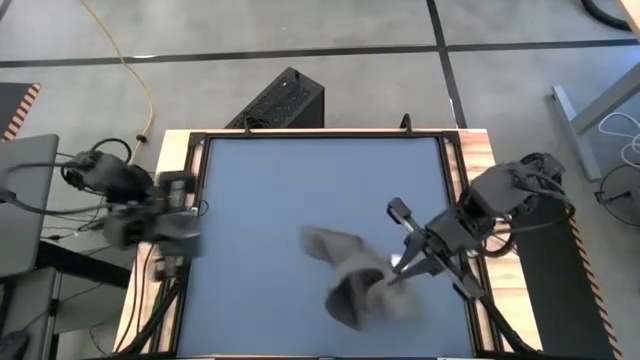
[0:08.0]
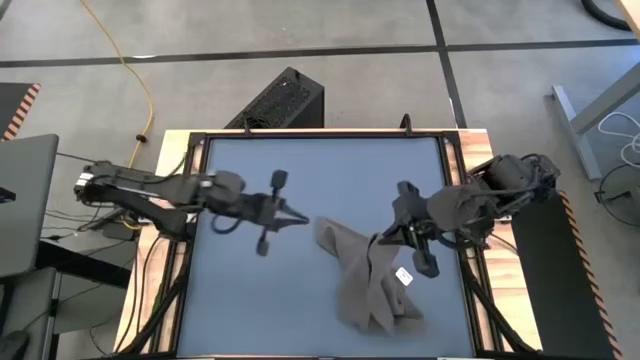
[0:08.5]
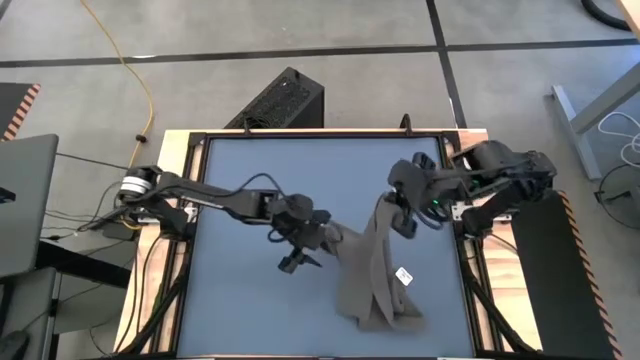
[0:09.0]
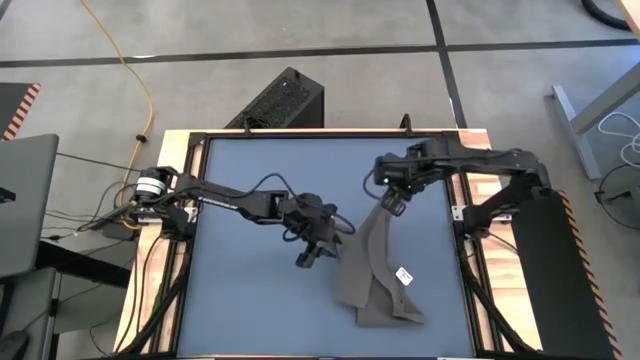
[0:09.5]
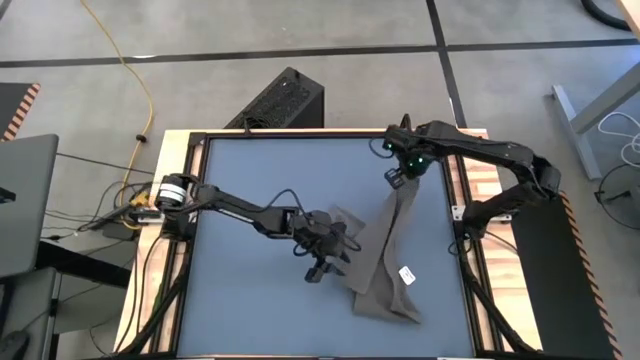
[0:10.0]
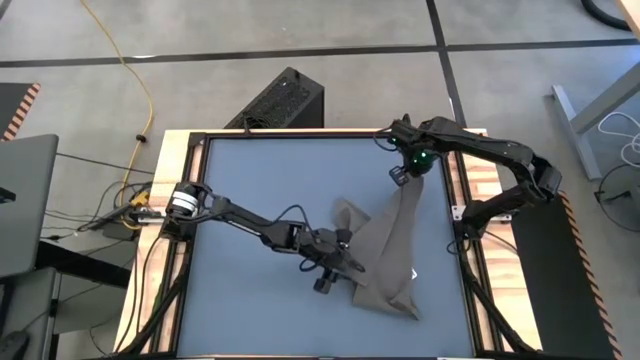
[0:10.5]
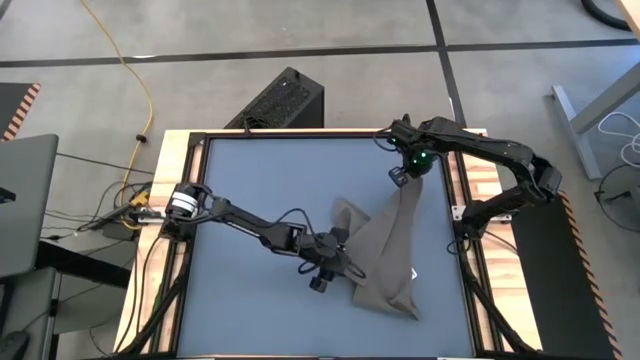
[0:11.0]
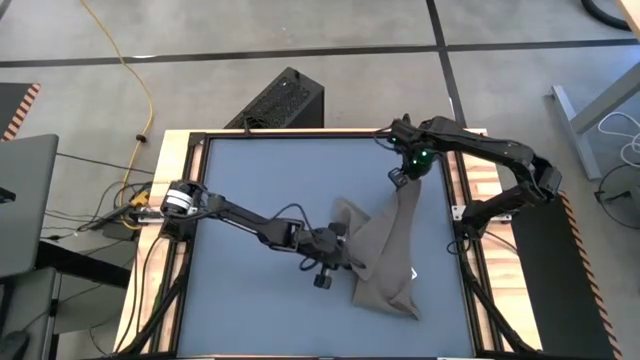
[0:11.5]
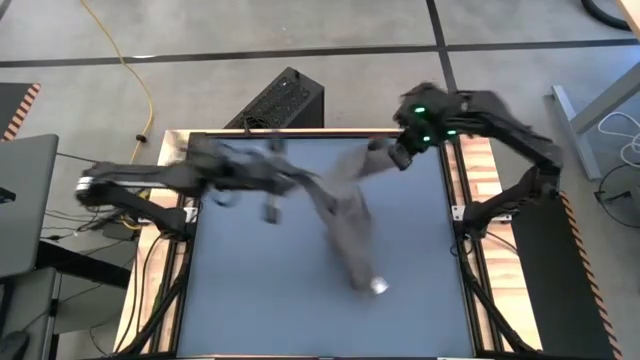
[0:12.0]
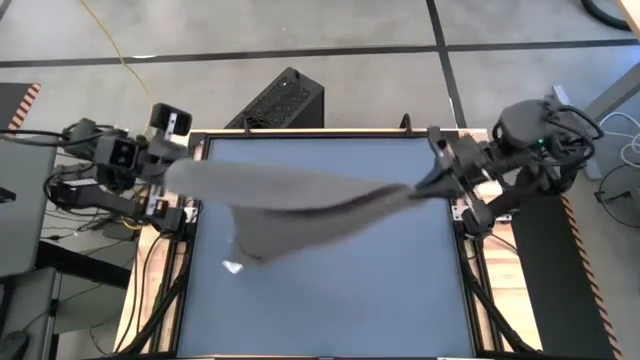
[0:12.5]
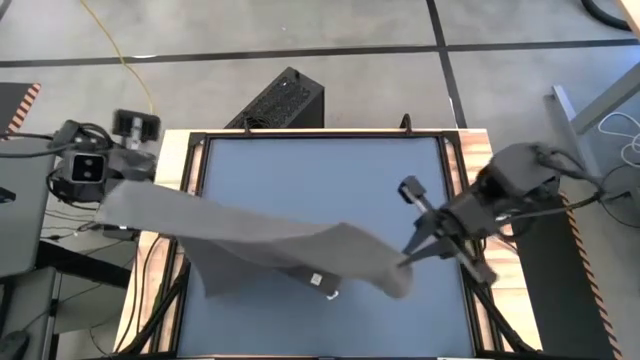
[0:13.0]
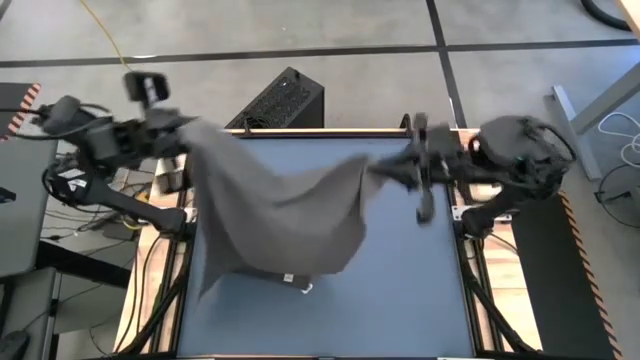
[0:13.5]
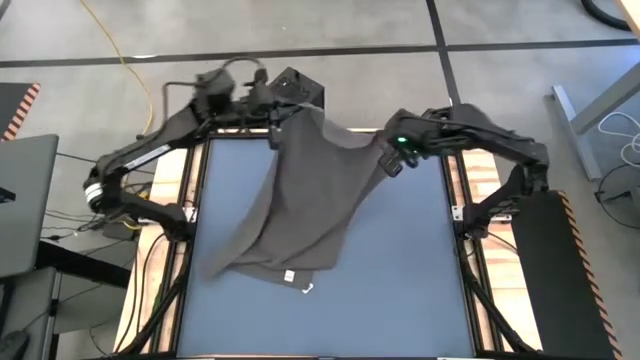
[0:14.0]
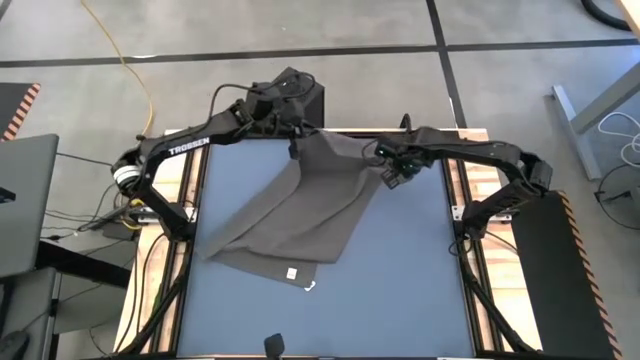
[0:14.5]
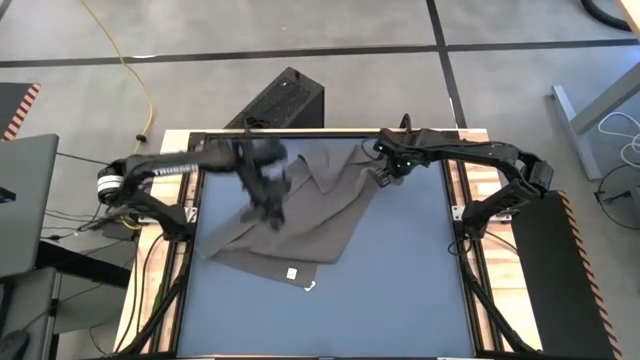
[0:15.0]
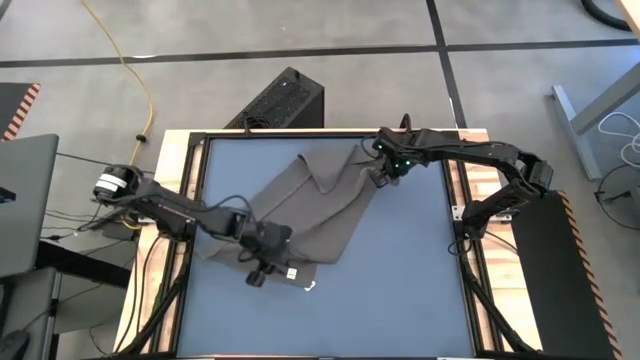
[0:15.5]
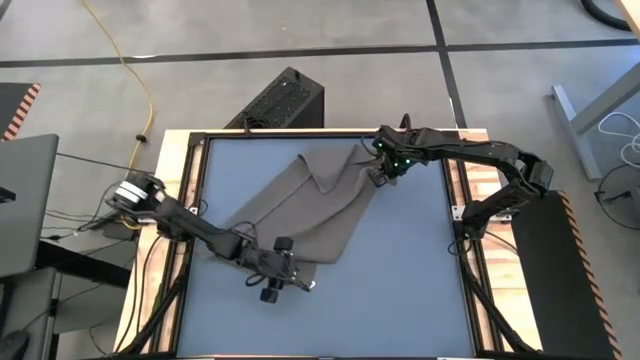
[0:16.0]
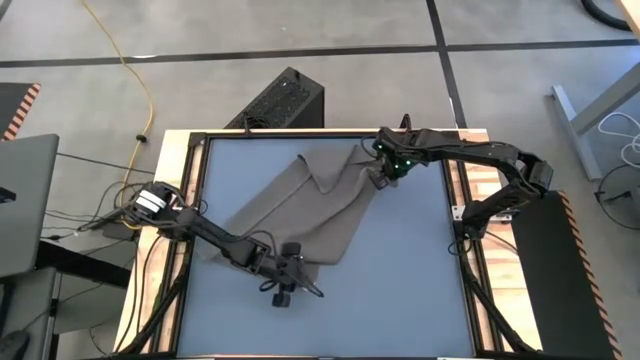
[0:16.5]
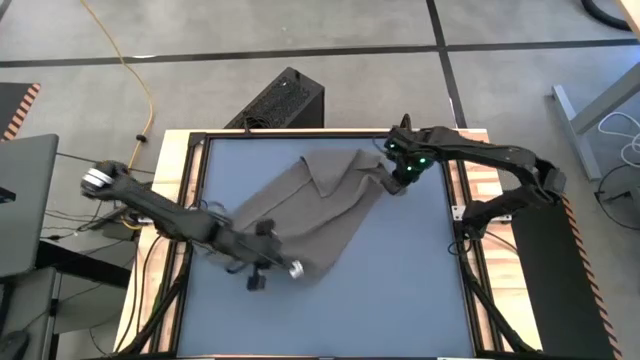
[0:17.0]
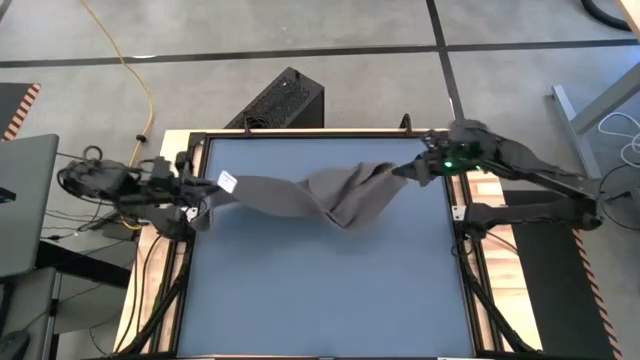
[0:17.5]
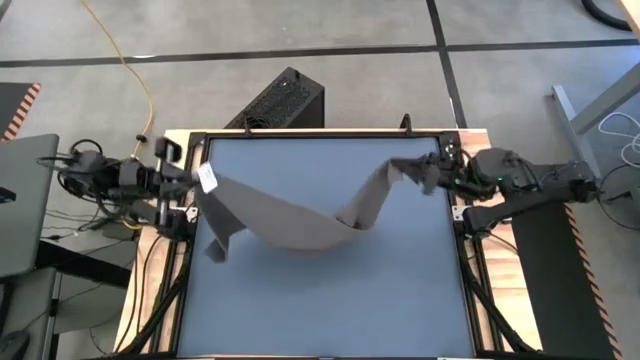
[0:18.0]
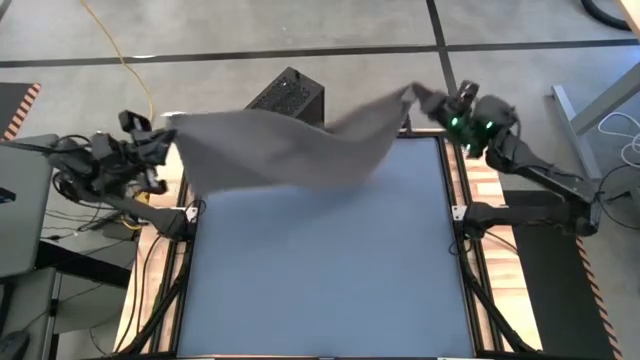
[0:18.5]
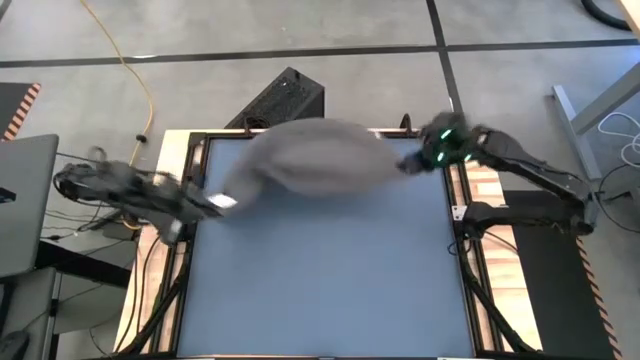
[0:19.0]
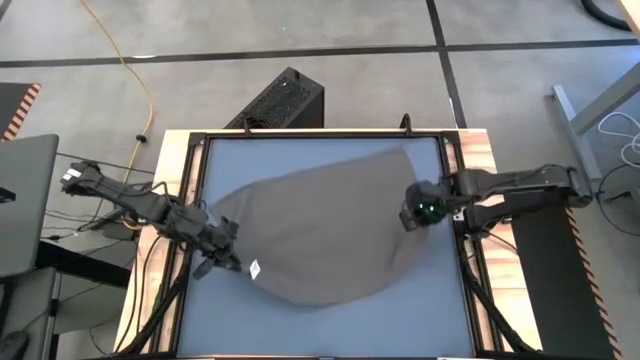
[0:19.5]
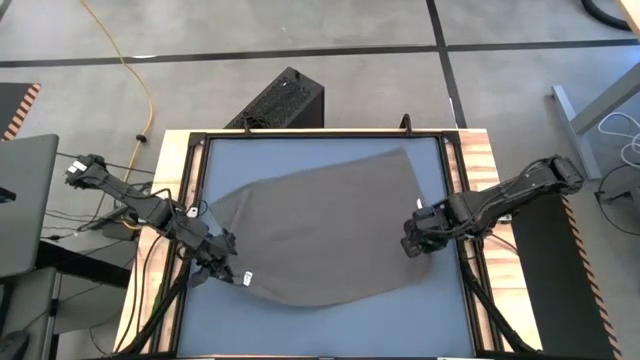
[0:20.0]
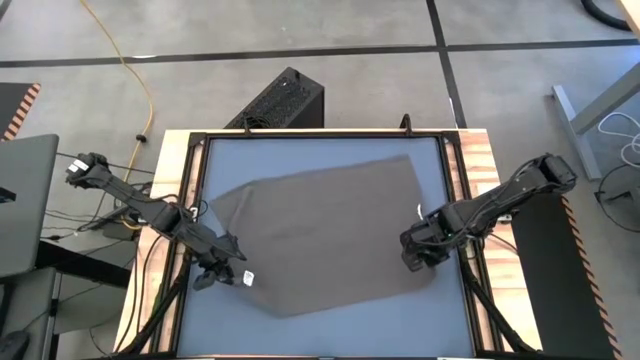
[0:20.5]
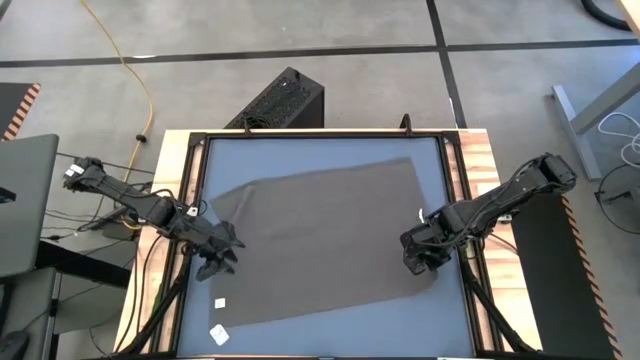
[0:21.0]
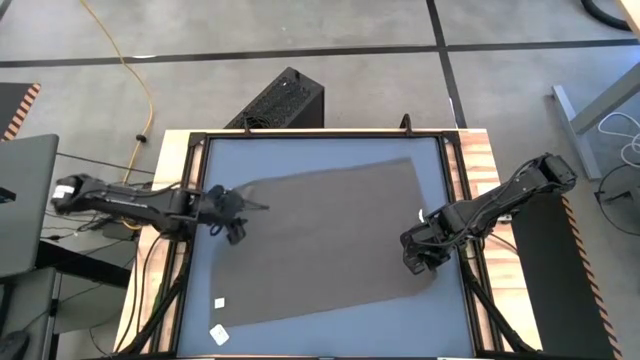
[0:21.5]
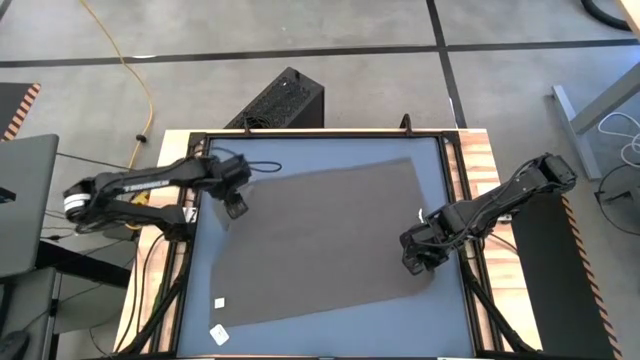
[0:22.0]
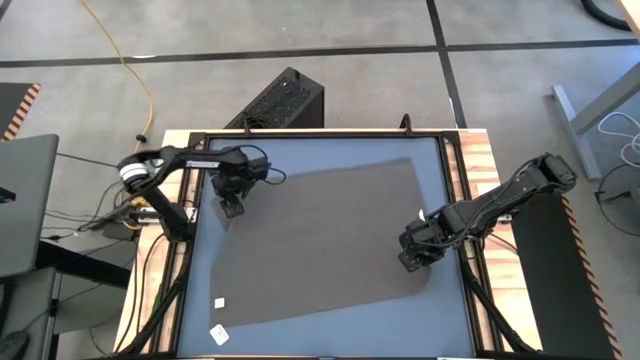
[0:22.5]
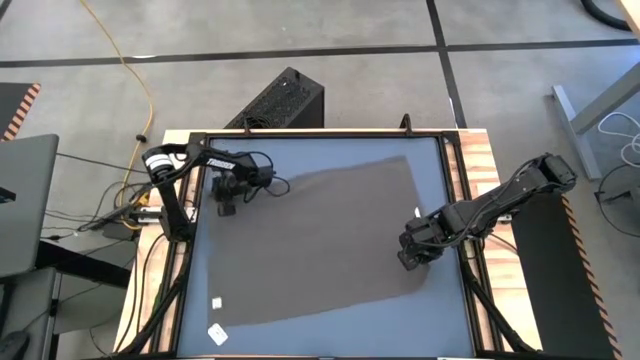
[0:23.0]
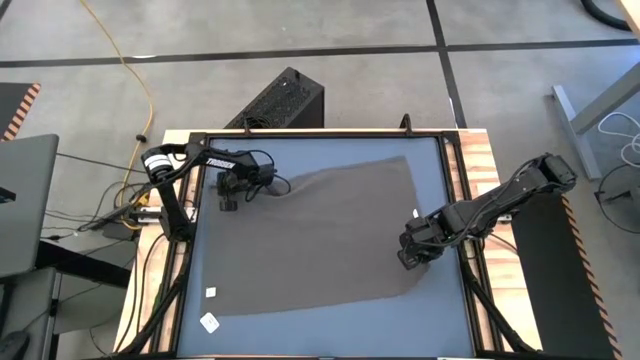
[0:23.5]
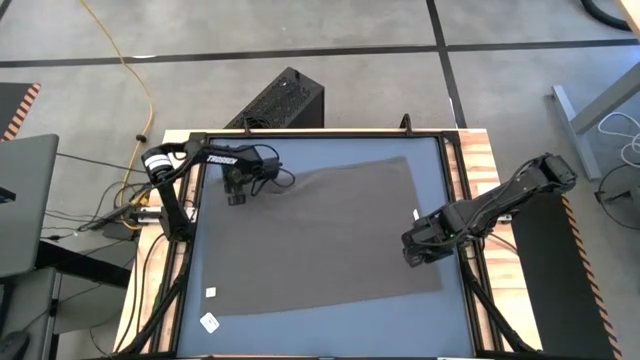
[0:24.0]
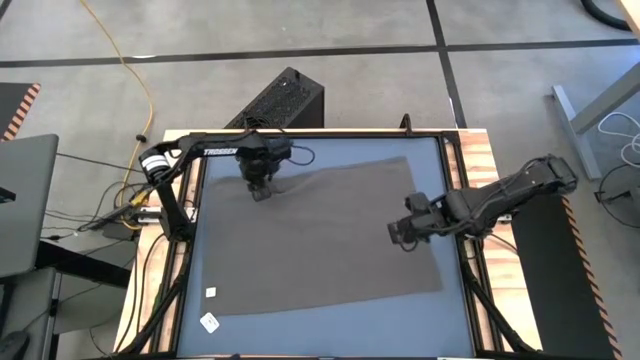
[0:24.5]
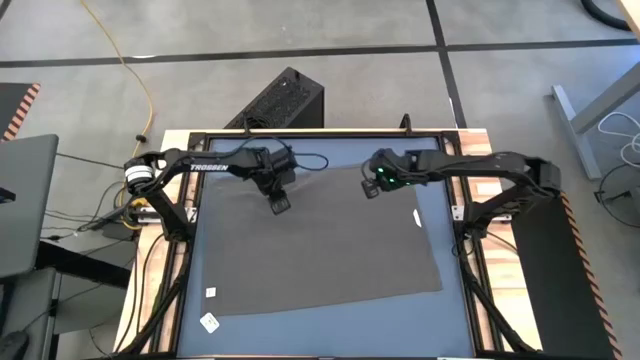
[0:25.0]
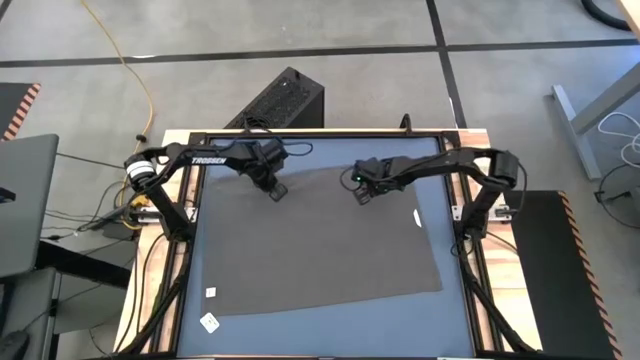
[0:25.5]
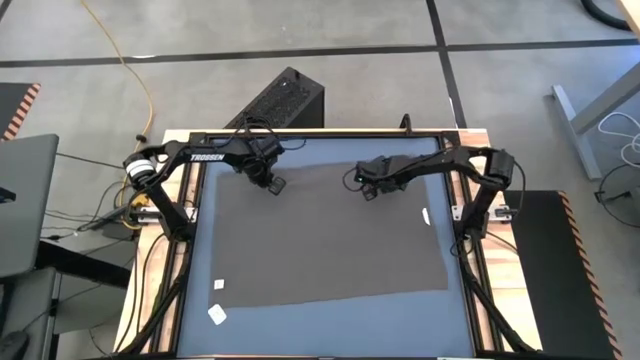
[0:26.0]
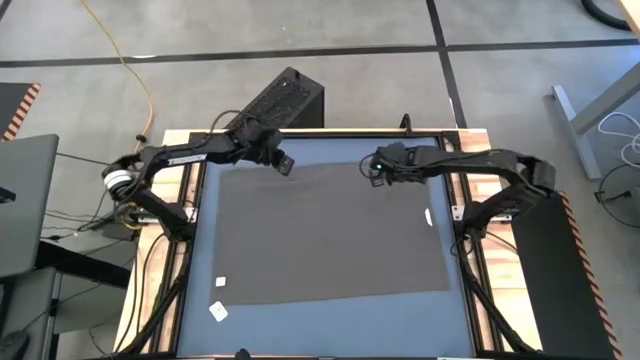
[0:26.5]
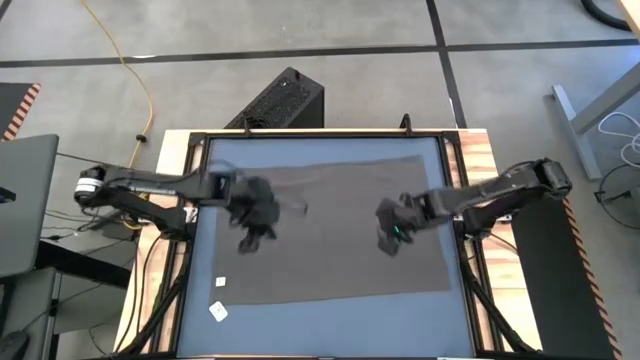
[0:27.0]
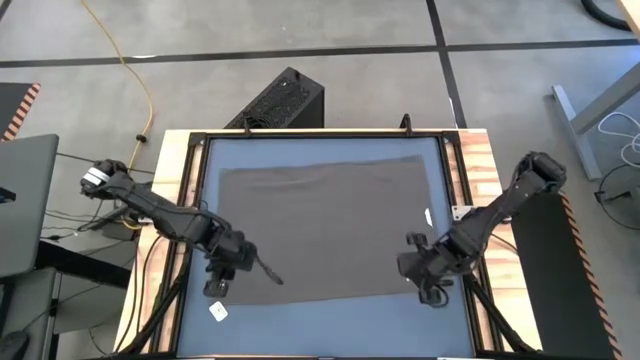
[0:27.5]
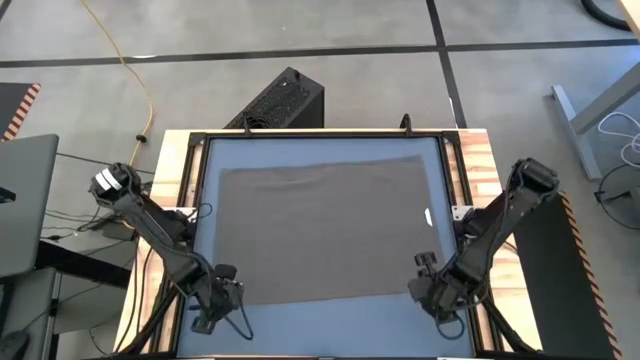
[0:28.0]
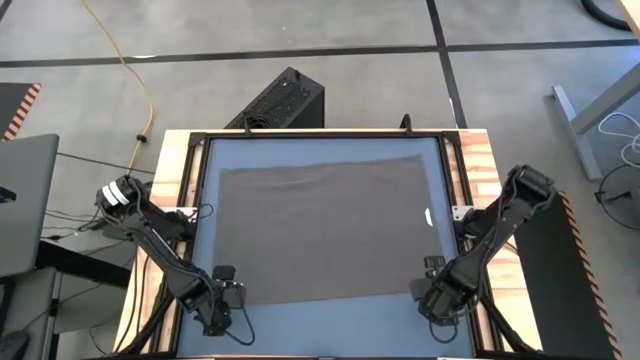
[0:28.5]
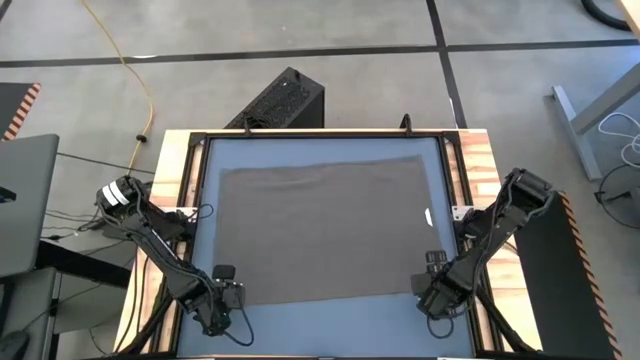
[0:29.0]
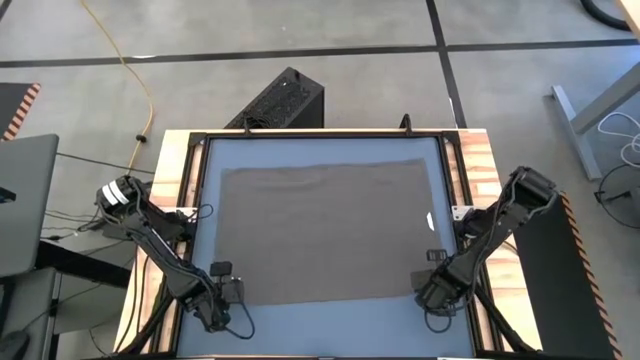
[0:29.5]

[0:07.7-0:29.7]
Task: Roll towel
Roll the grey towel
